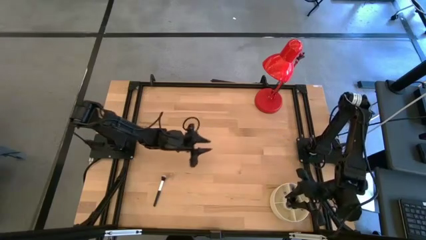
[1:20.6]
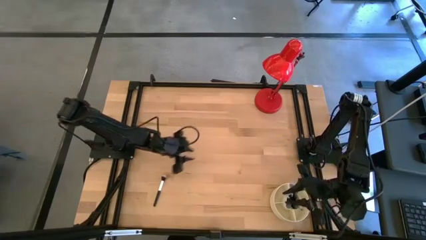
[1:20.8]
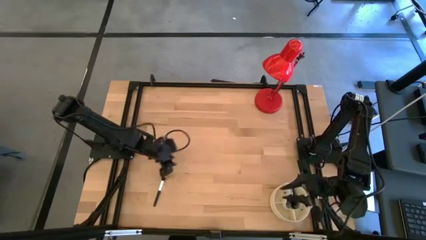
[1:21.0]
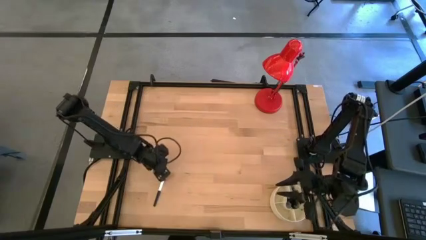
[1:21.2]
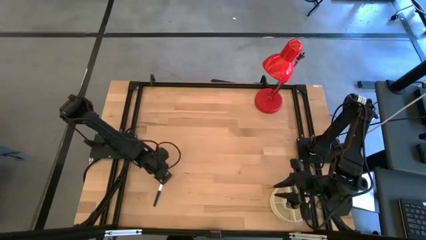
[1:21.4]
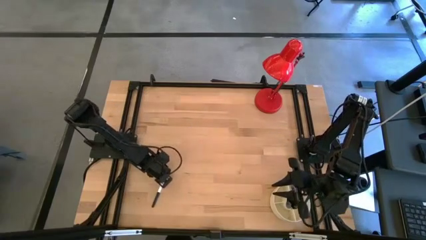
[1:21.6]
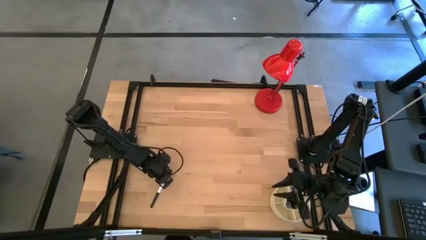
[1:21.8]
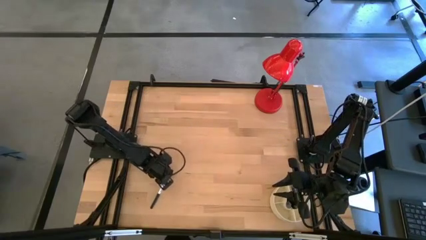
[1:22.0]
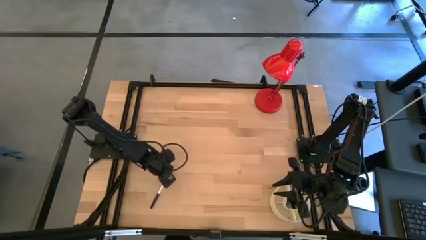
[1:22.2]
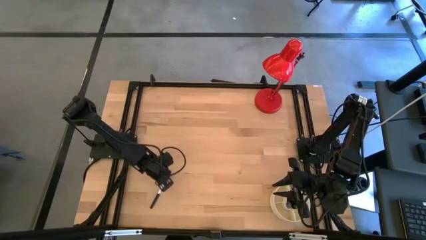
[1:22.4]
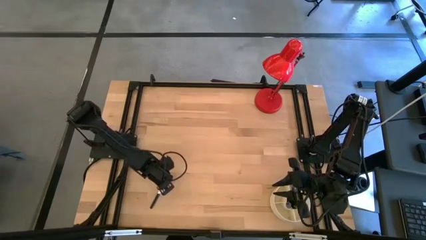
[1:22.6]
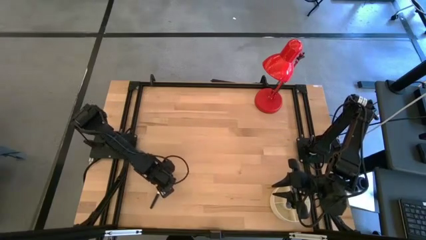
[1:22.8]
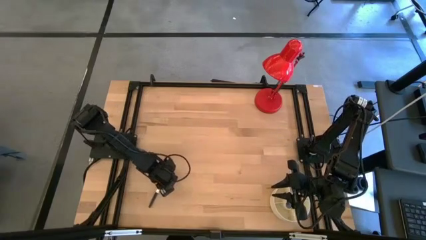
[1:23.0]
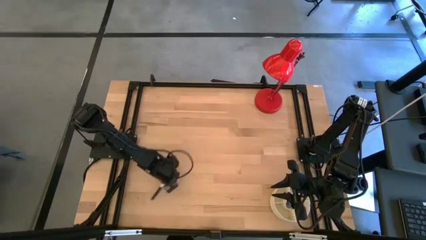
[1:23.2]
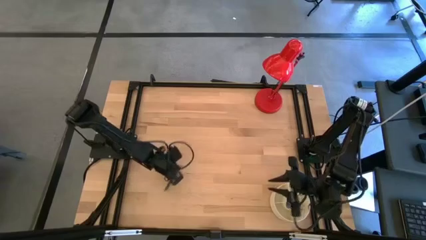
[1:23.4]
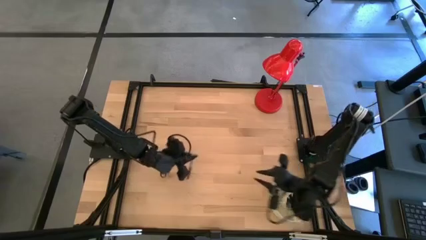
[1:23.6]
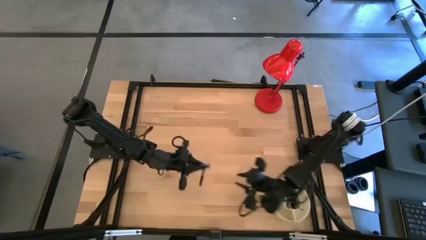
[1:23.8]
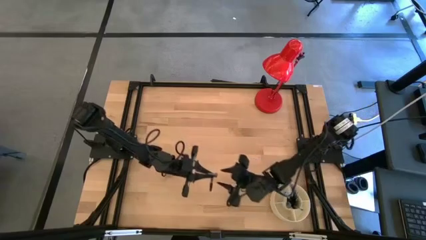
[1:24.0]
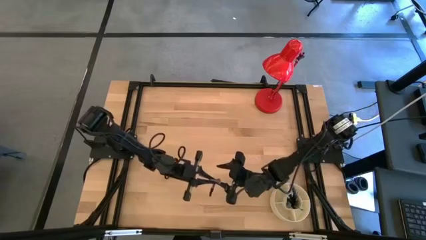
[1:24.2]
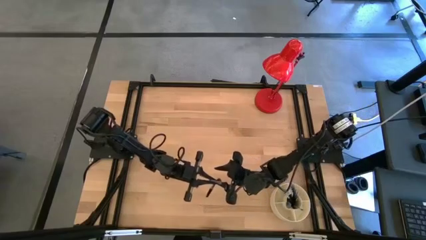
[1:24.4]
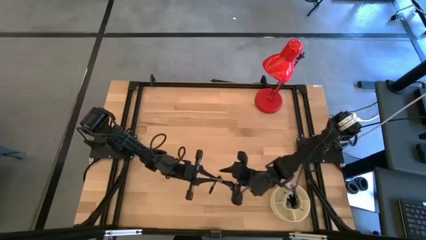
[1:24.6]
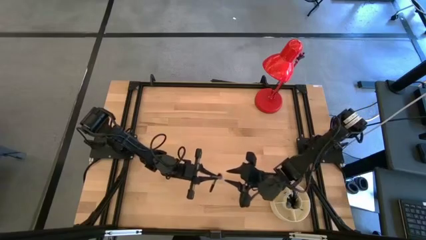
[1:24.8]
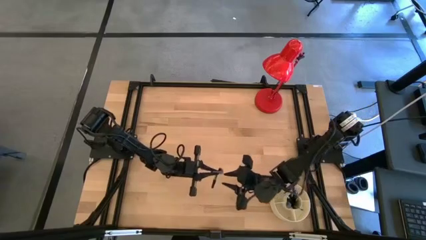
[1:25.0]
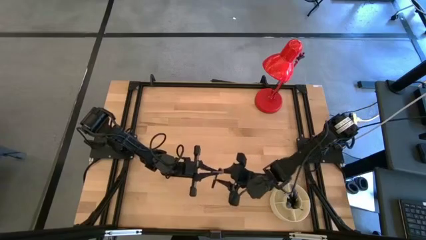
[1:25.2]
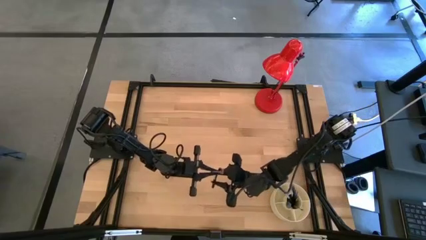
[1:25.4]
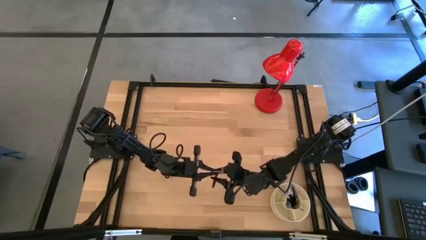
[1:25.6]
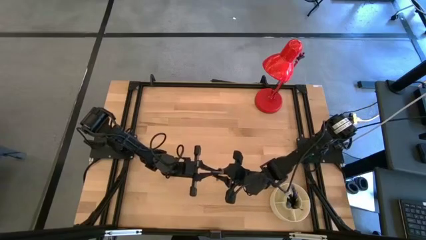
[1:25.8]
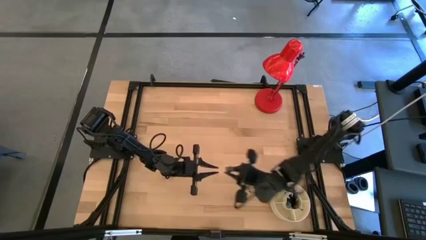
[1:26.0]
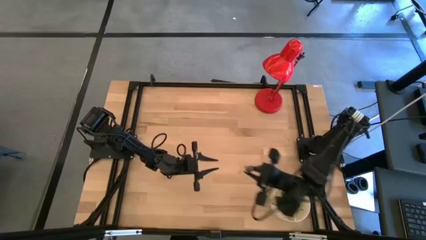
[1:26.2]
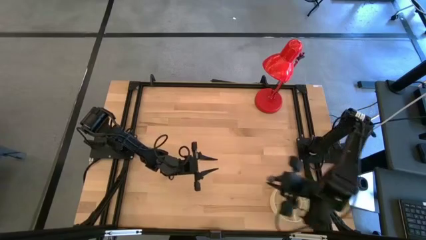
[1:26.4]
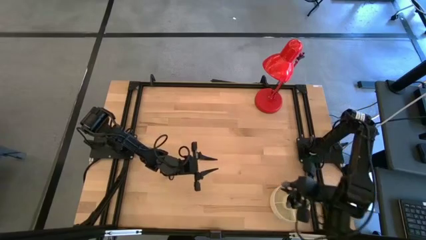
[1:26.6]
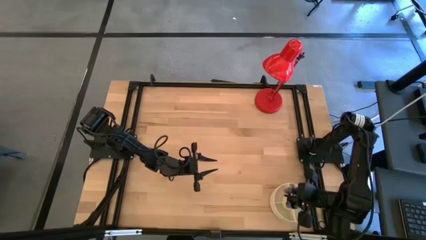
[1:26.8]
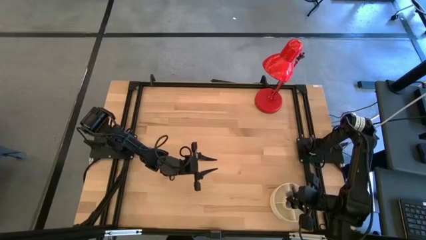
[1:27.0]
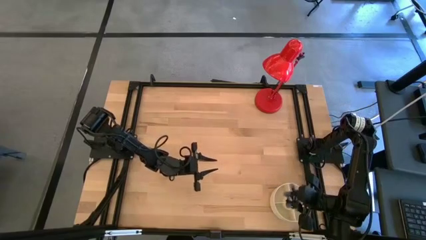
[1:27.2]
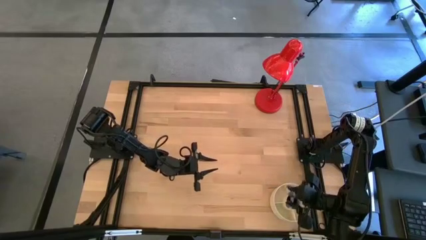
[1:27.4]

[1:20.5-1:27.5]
Task: Put items in baskets/containers
Put the black powder brush into the yellow pen organizer

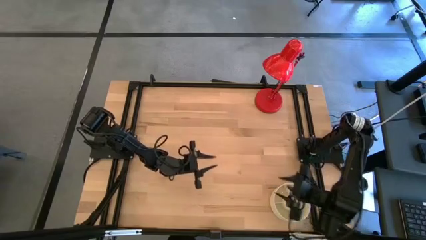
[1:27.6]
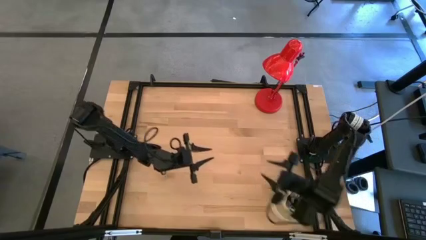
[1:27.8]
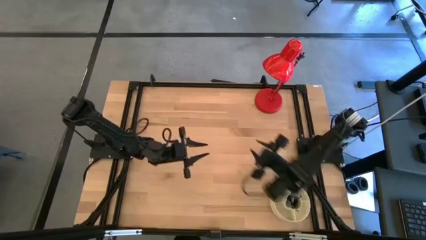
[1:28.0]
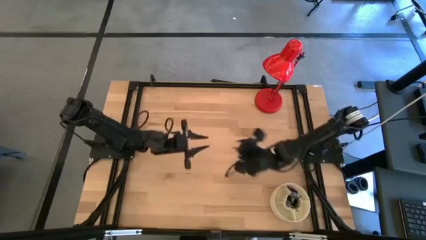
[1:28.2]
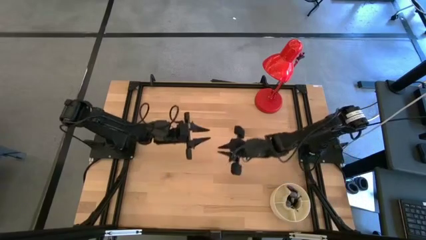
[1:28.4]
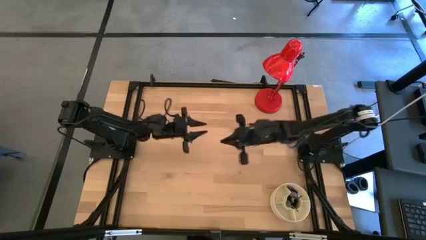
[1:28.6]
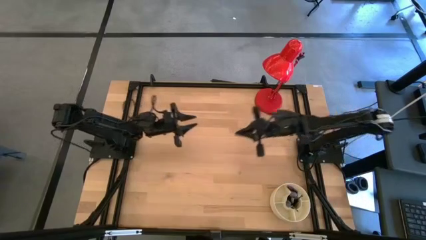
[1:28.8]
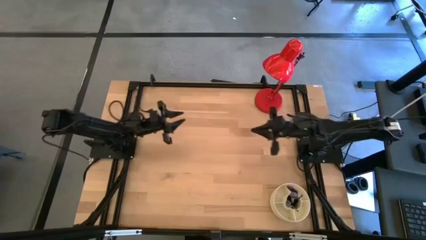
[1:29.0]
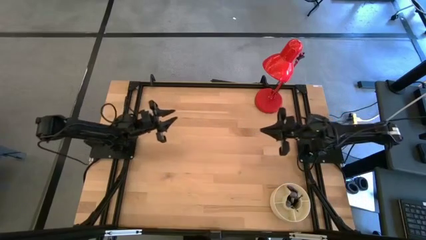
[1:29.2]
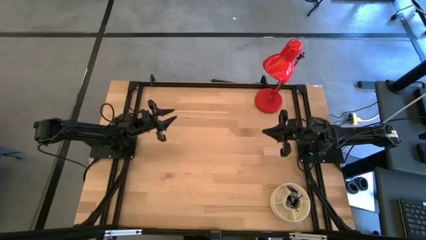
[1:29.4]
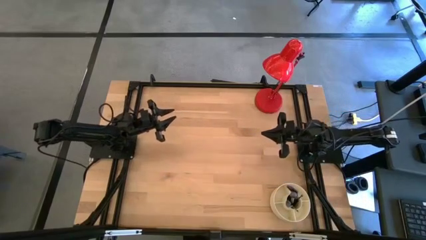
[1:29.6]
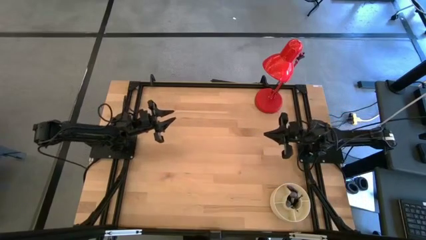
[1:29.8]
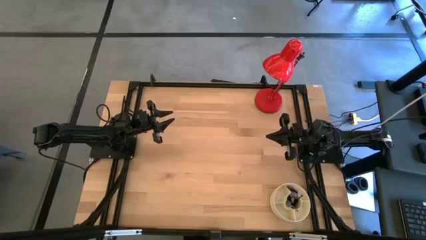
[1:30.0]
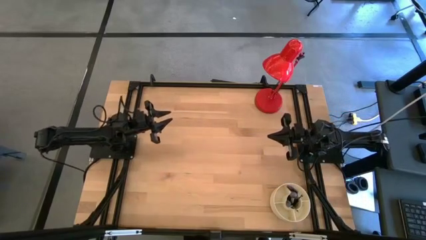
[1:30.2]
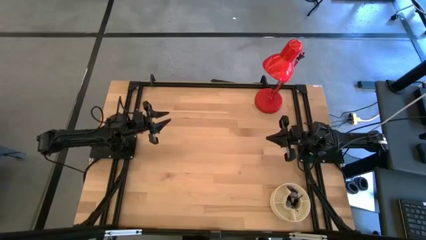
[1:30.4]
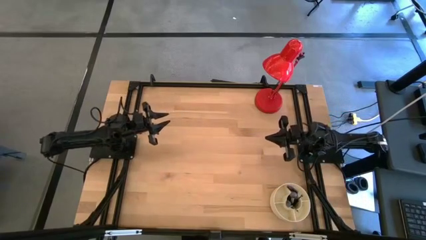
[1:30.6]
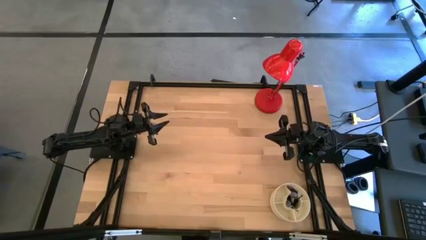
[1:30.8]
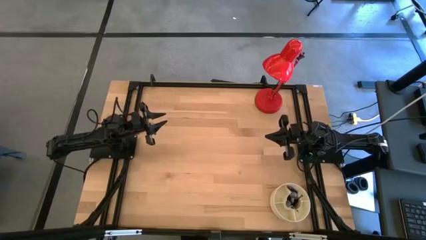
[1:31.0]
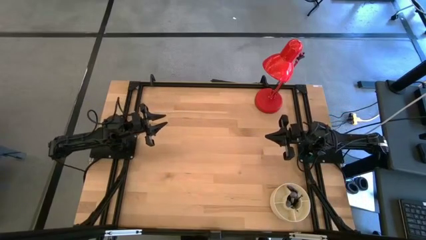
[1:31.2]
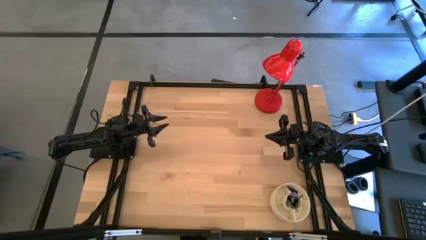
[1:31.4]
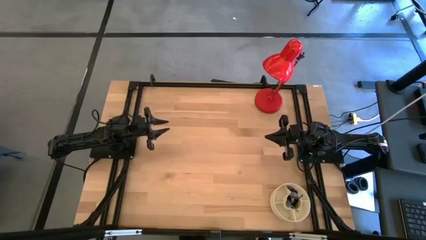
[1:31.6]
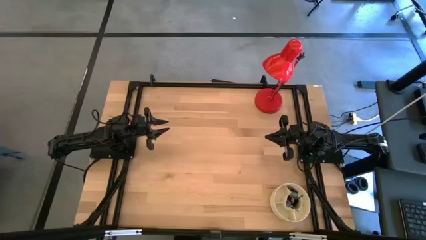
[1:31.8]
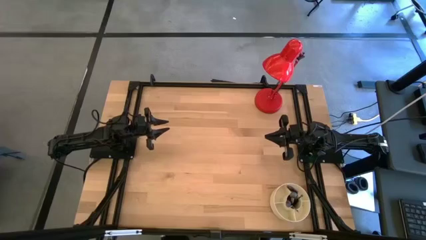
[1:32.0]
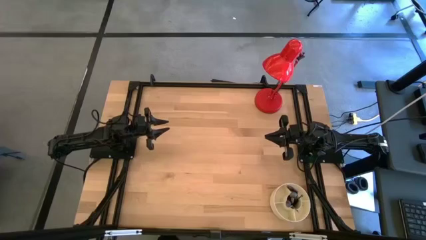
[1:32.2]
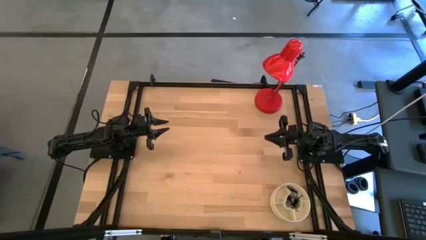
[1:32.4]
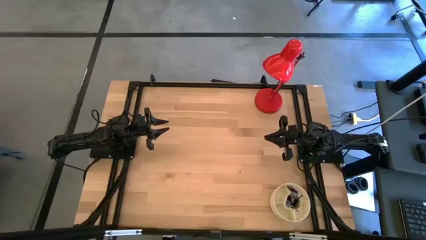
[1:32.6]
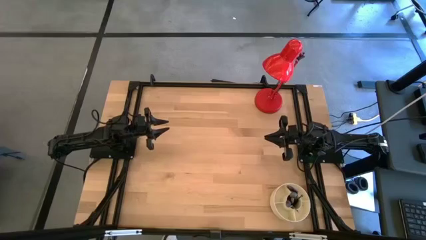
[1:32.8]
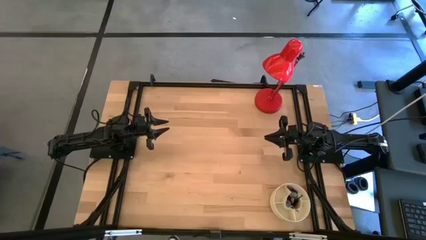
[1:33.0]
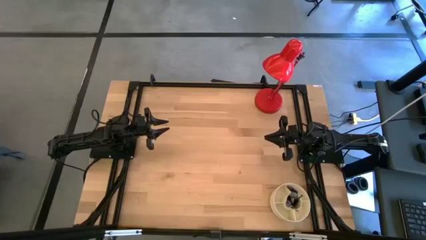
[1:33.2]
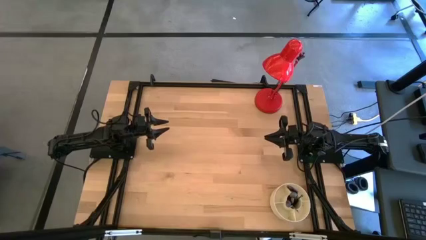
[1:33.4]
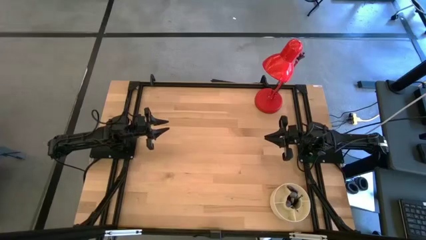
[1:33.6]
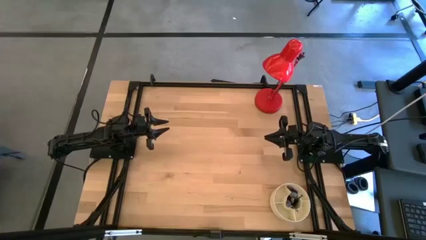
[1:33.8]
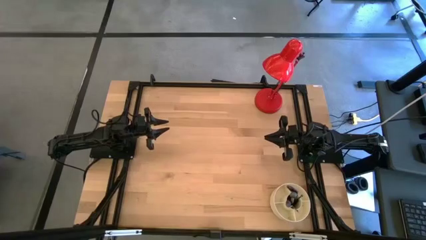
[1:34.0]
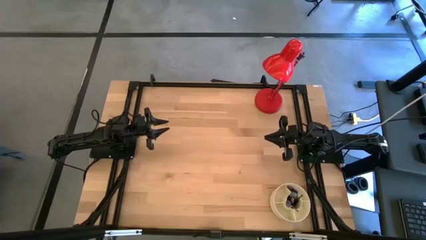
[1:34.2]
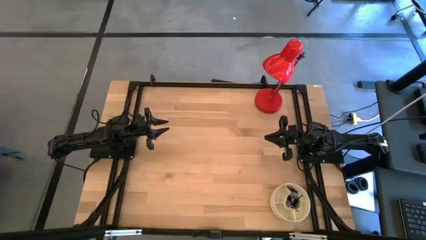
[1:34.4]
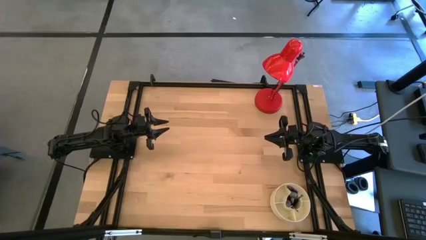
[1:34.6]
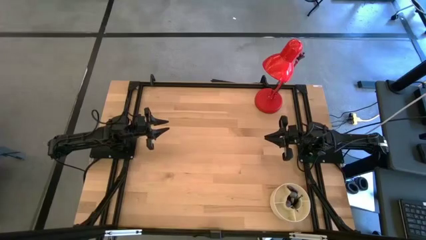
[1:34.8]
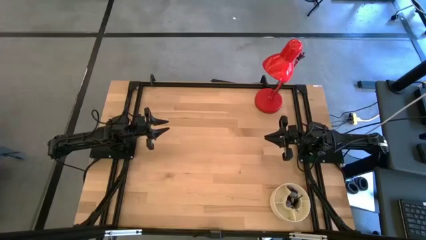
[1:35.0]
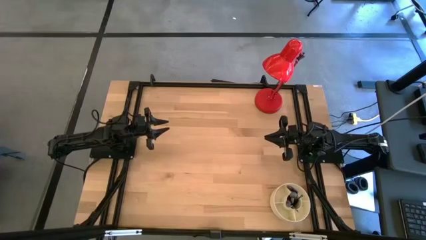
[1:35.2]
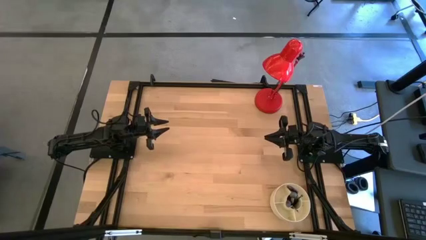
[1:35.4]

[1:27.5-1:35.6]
Return to Home Position
